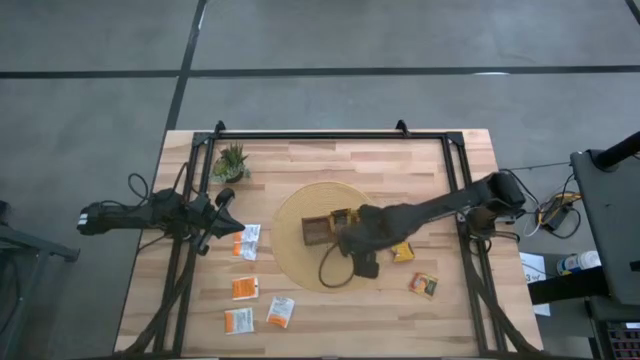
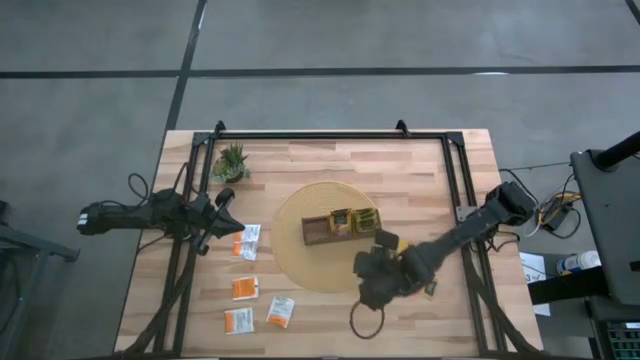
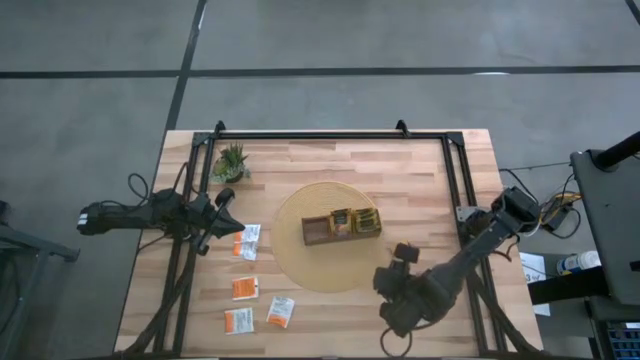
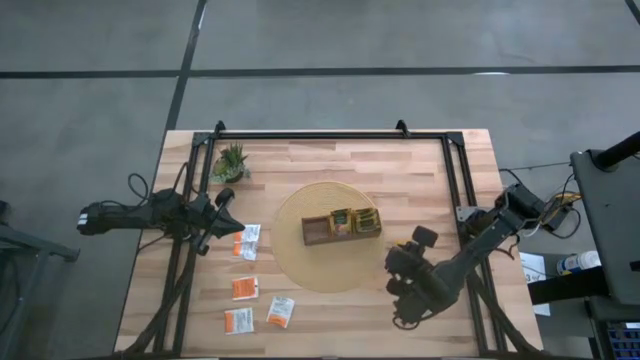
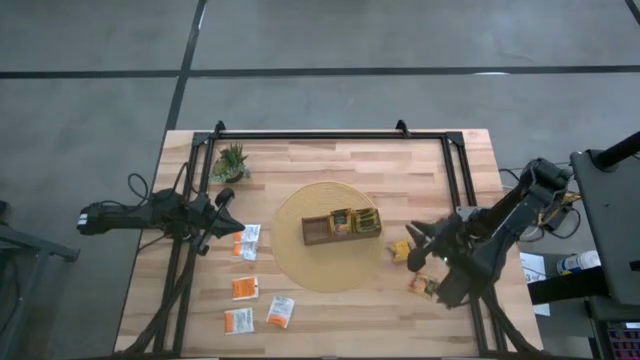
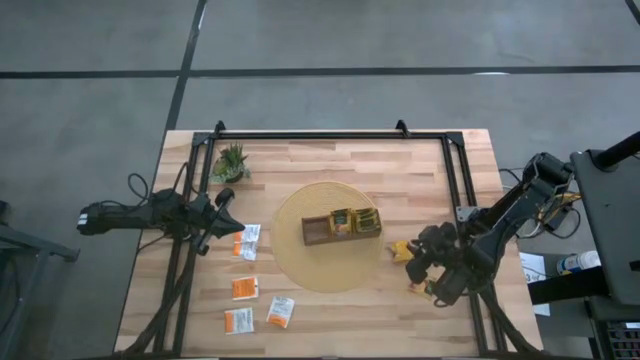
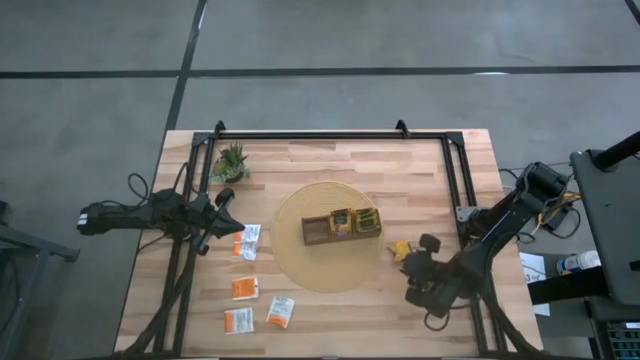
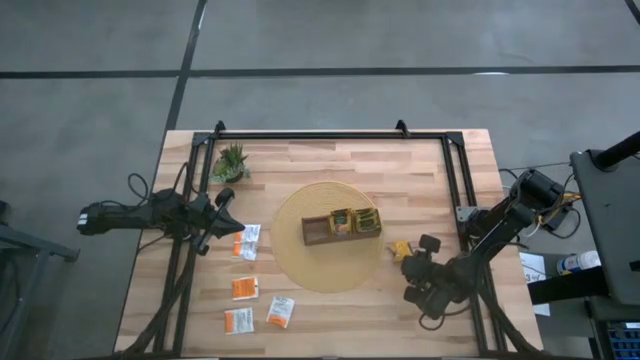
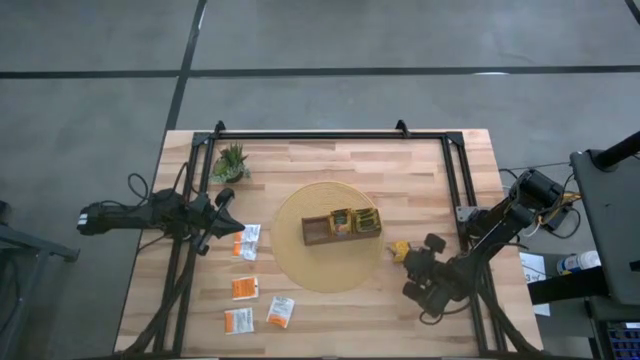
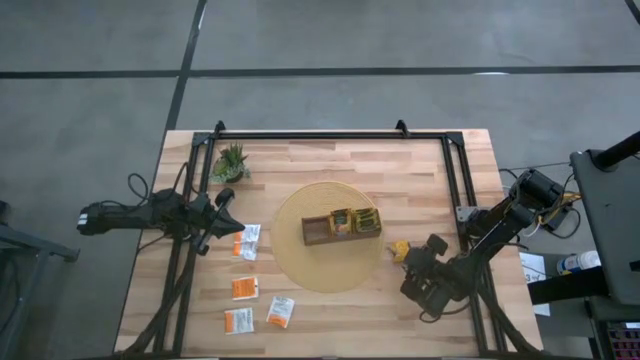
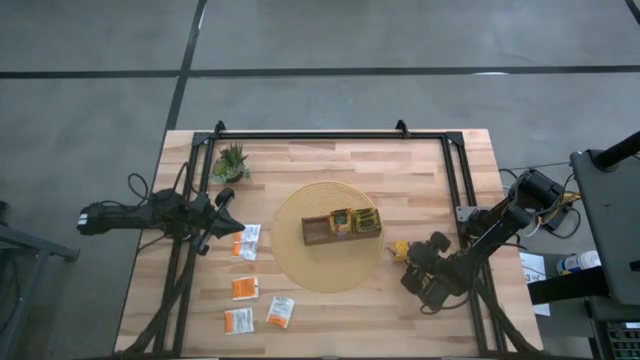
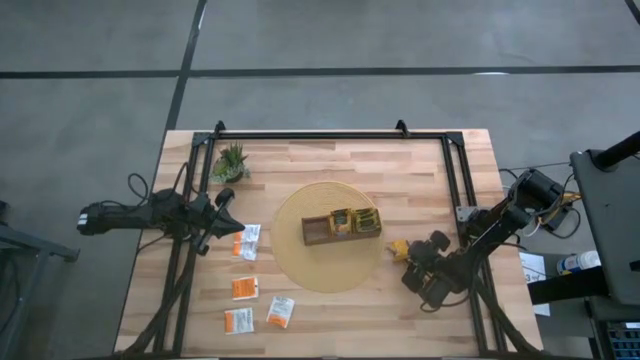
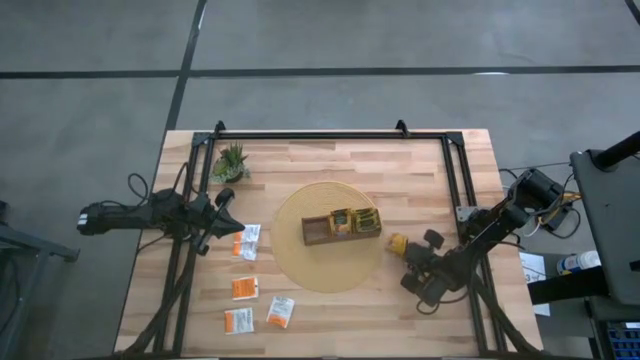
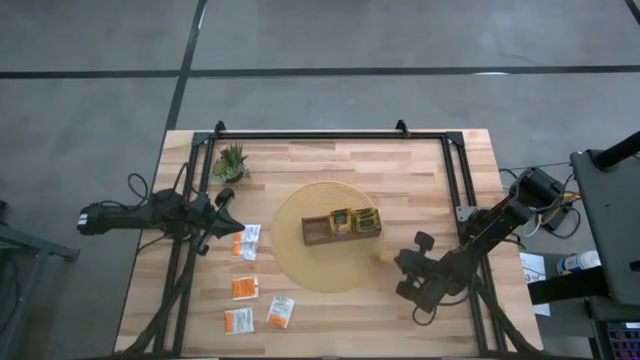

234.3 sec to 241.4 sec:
Task: Pick & Place Tea
Put the top orange tea bag into the middle of the wooden organizer

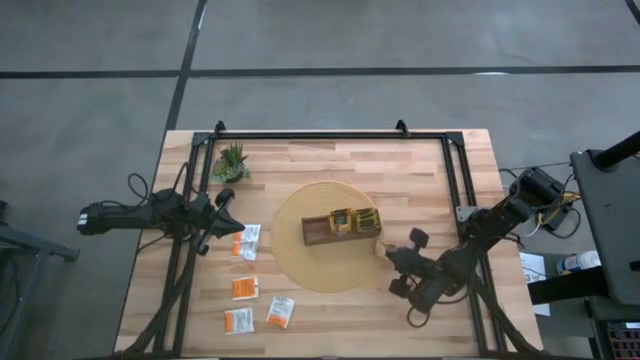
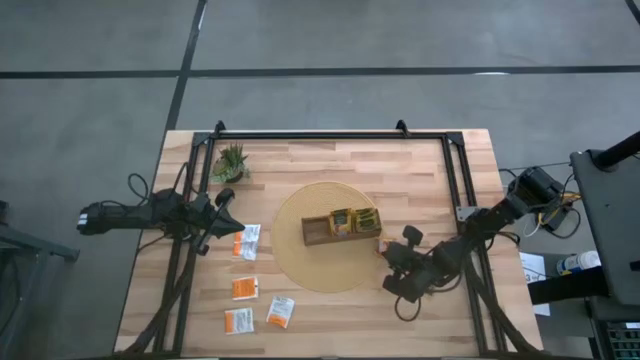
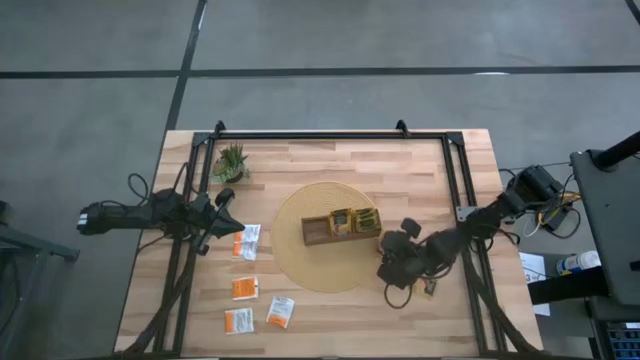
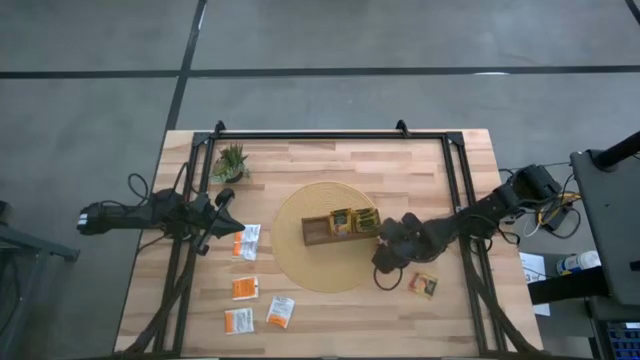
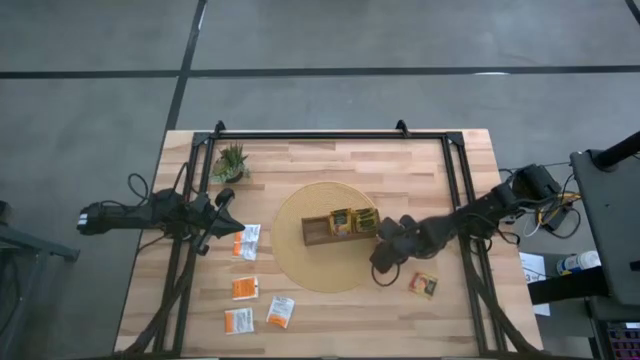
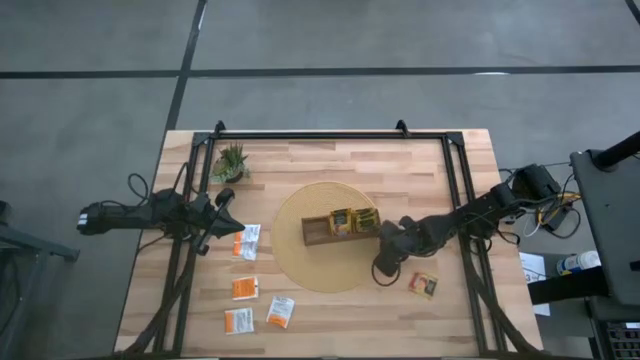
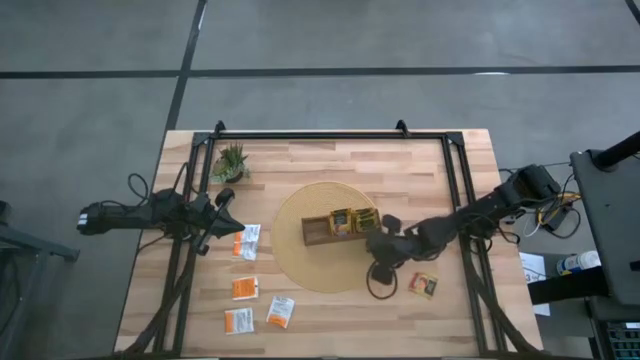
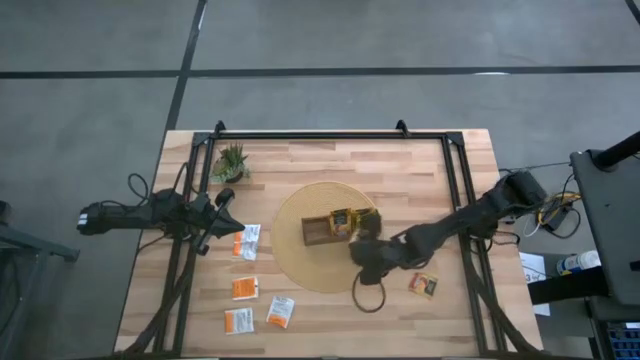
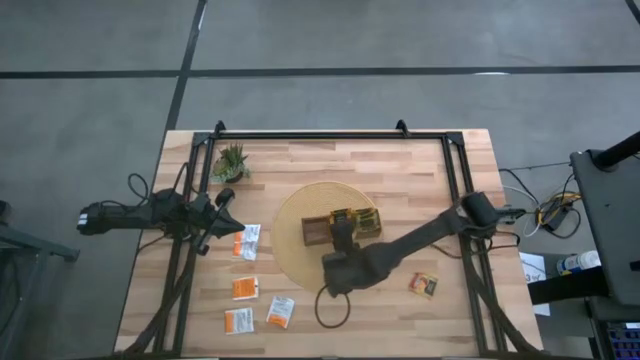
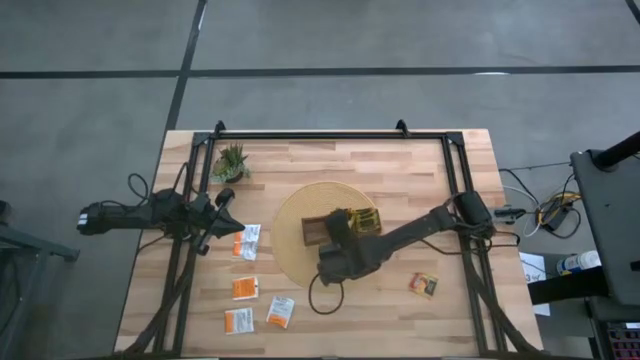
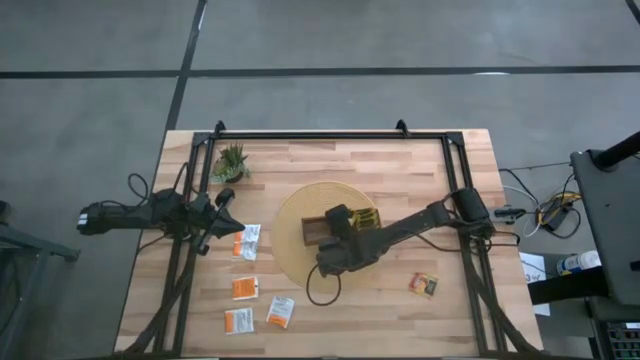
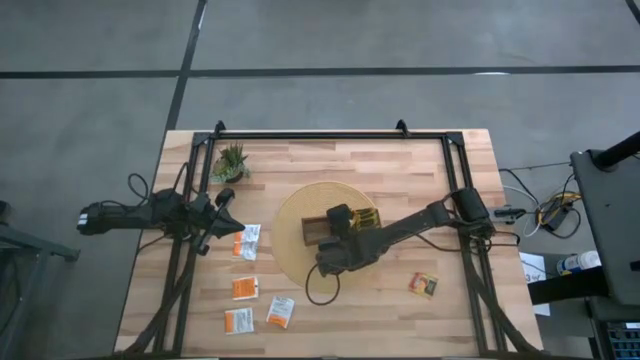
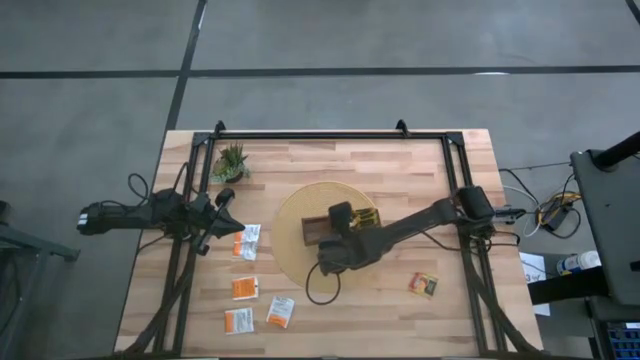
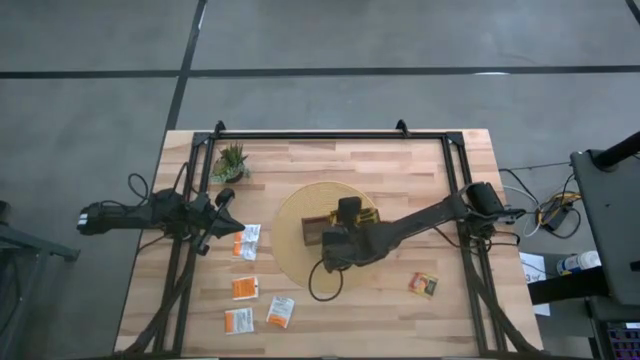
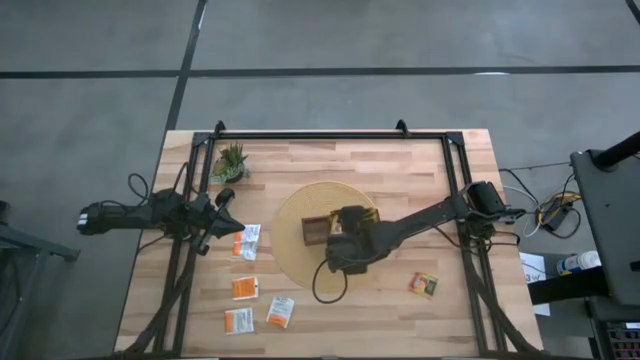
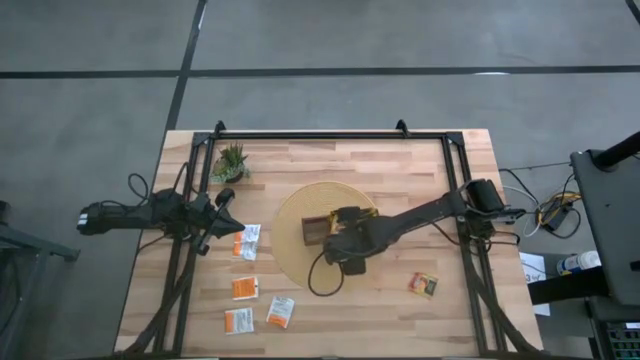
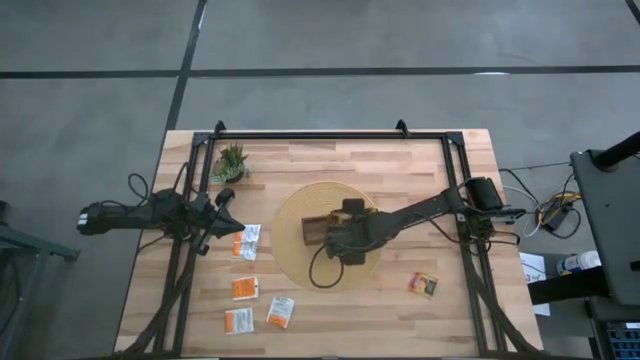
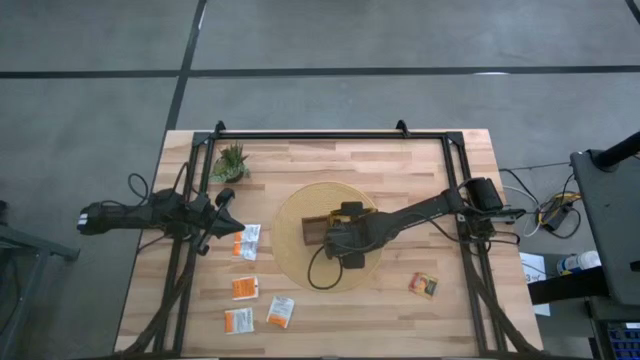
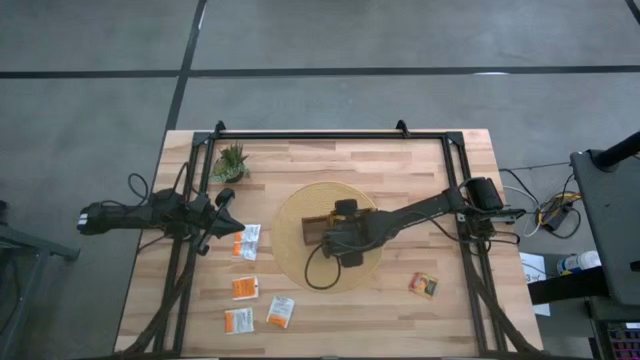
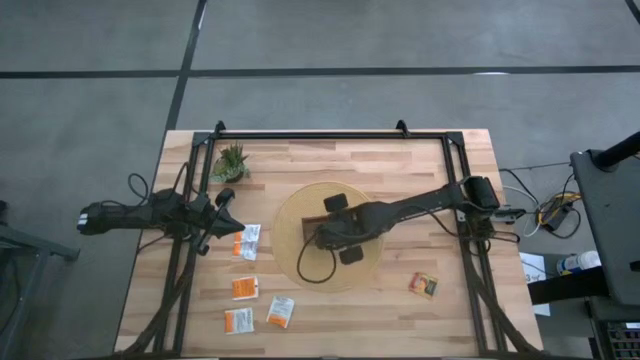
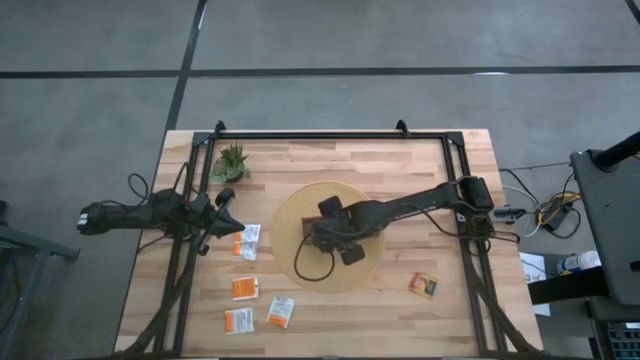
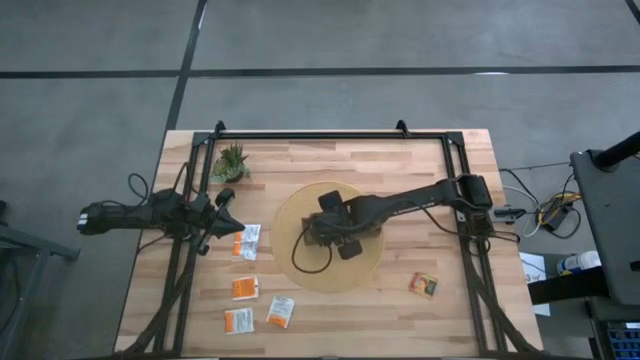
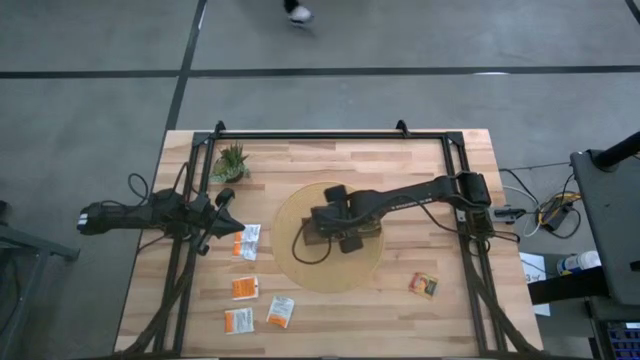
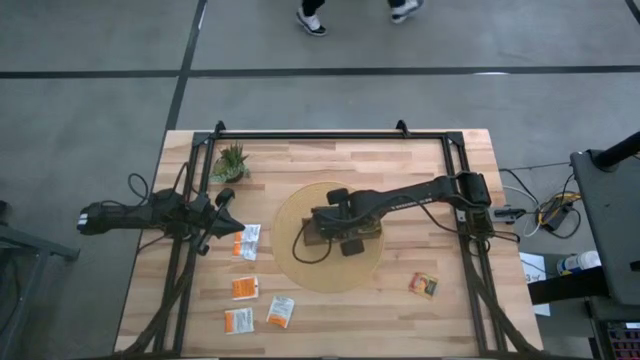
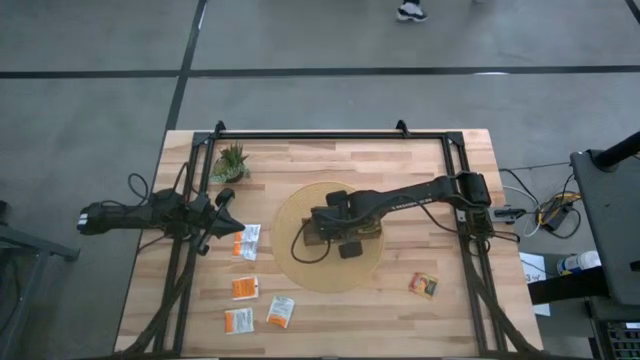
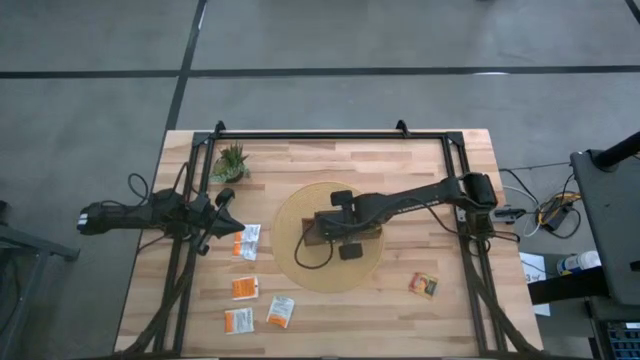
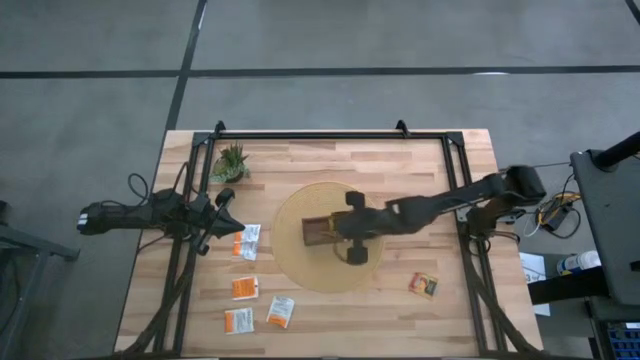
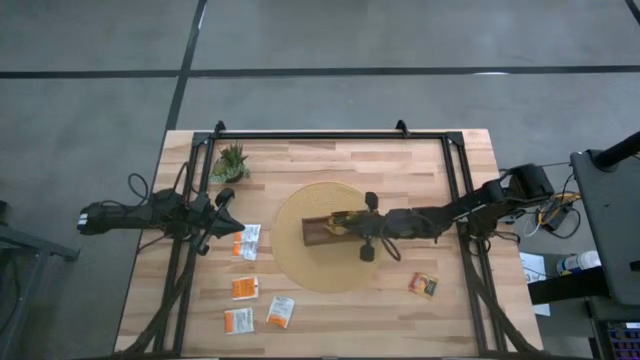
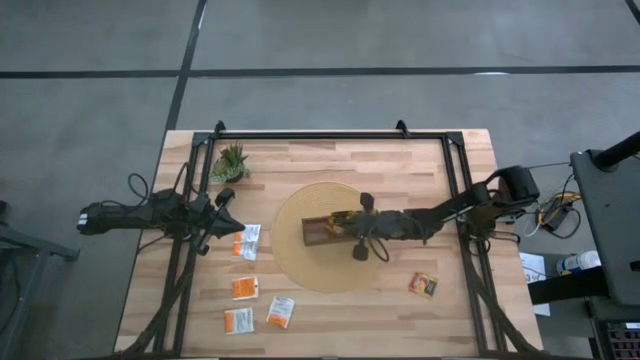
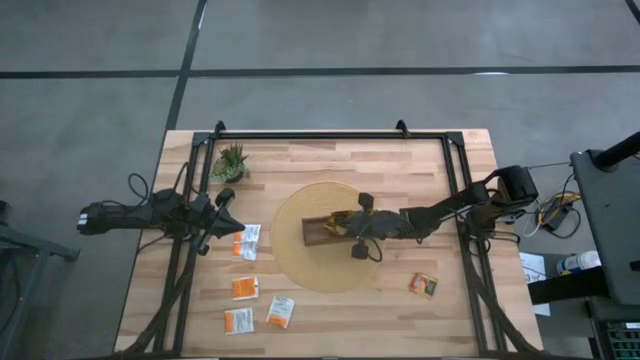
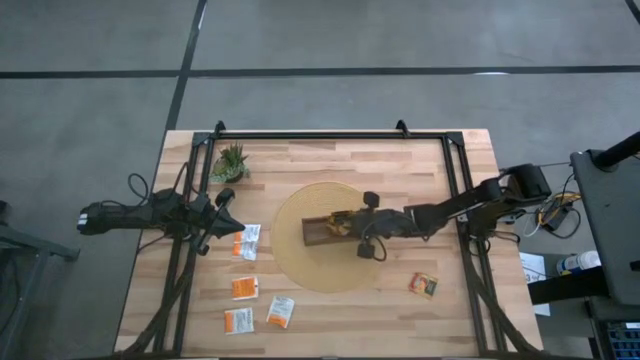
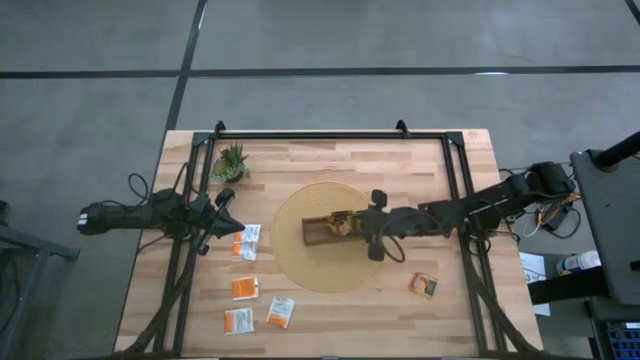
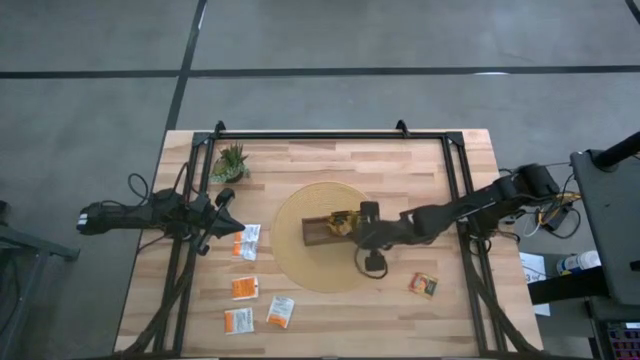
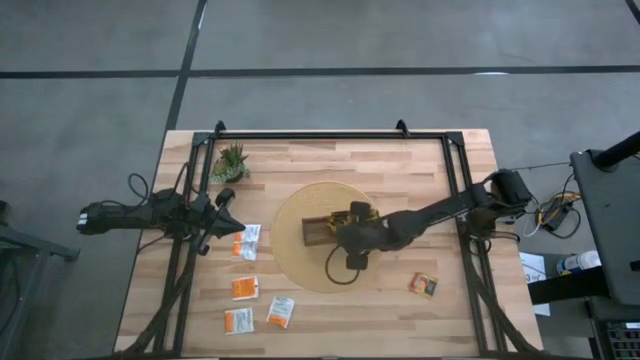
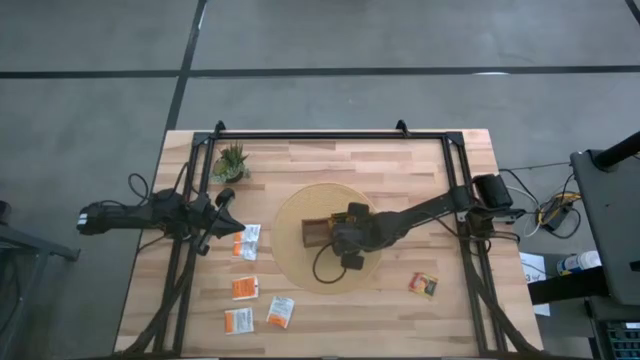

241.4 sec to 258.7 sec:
Put the orange tea bag into the middle of the wooden organizer
